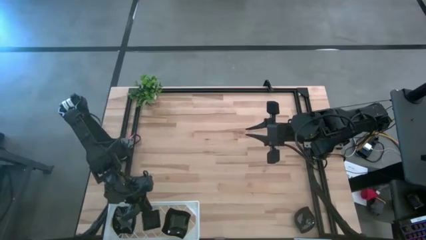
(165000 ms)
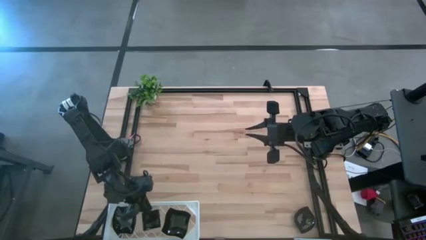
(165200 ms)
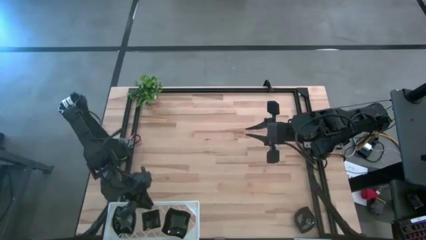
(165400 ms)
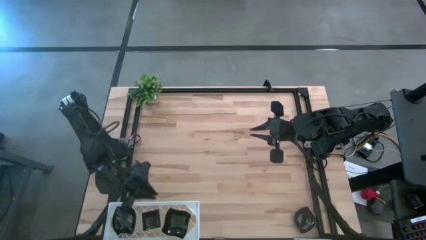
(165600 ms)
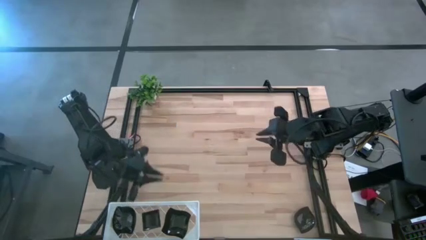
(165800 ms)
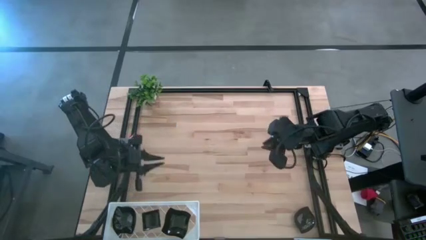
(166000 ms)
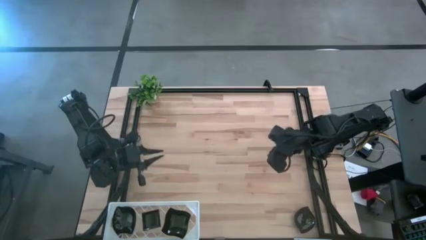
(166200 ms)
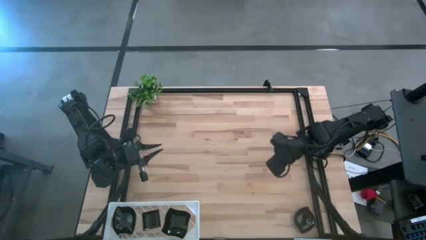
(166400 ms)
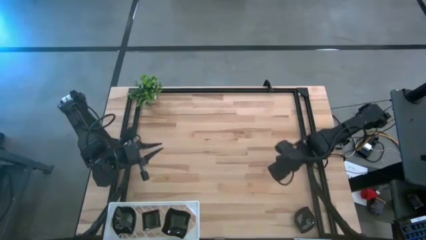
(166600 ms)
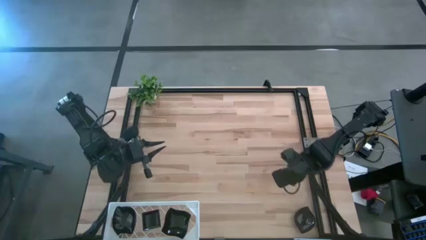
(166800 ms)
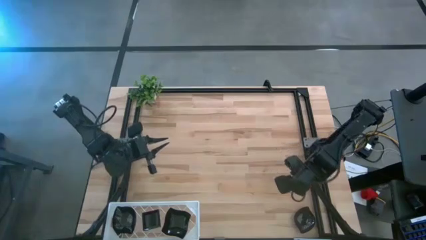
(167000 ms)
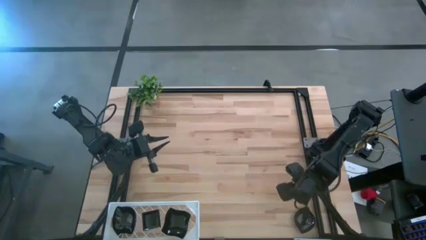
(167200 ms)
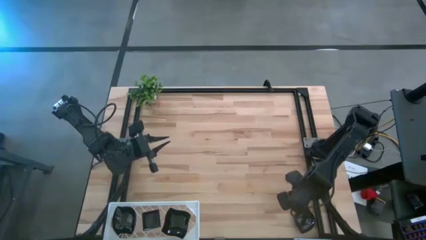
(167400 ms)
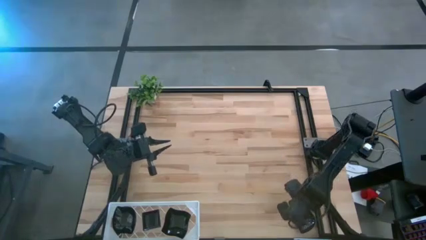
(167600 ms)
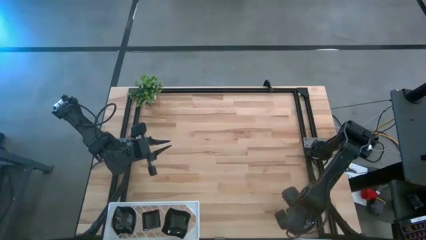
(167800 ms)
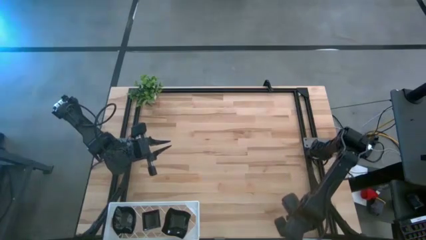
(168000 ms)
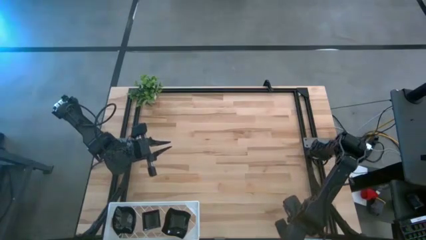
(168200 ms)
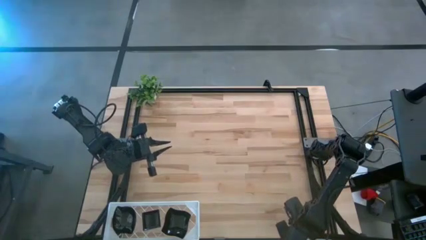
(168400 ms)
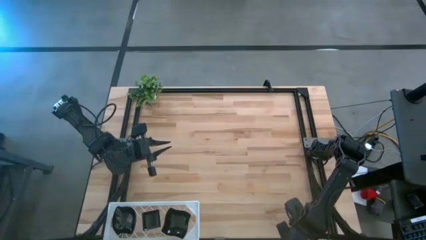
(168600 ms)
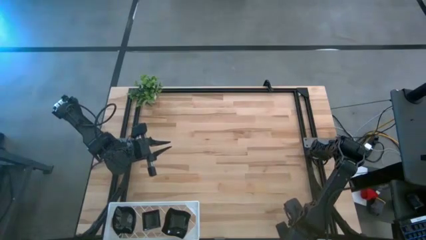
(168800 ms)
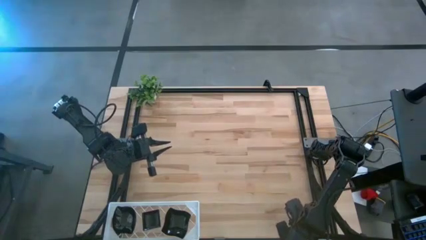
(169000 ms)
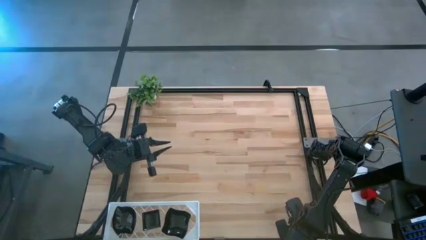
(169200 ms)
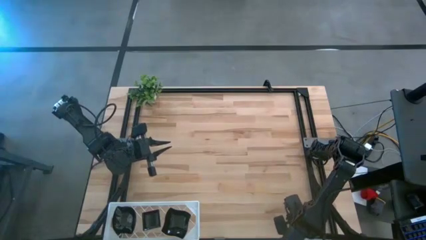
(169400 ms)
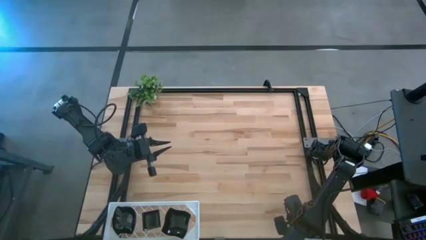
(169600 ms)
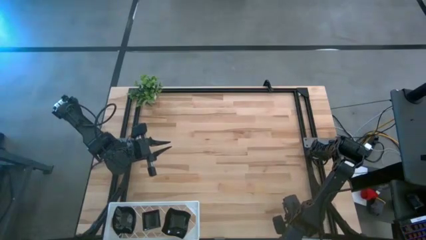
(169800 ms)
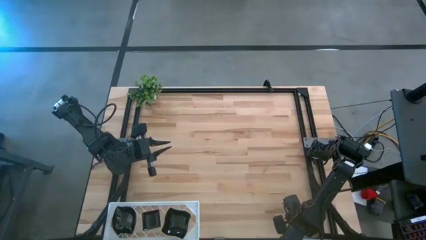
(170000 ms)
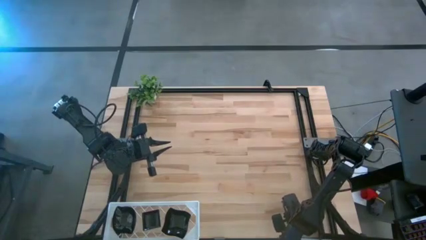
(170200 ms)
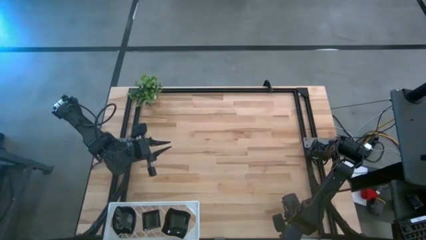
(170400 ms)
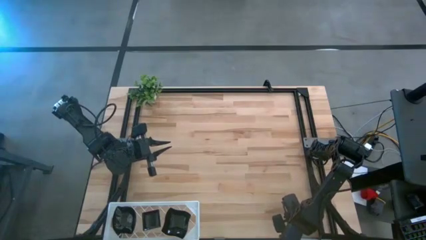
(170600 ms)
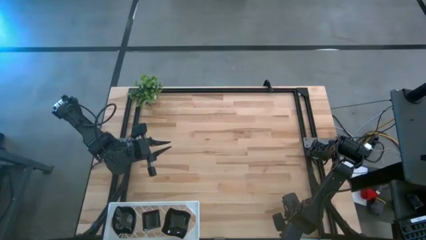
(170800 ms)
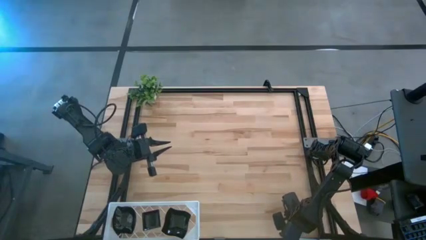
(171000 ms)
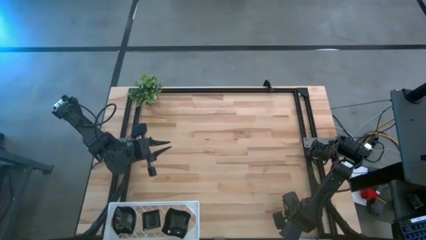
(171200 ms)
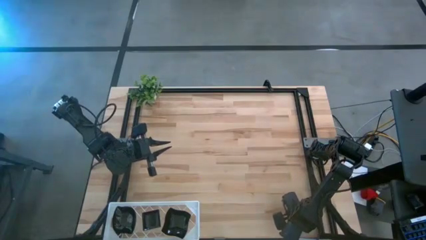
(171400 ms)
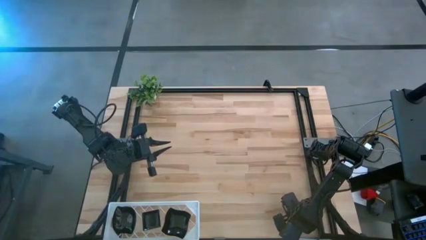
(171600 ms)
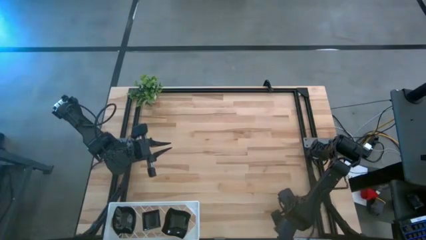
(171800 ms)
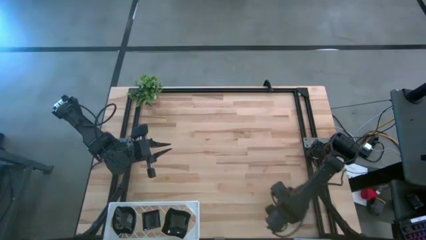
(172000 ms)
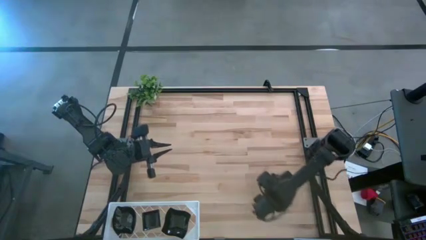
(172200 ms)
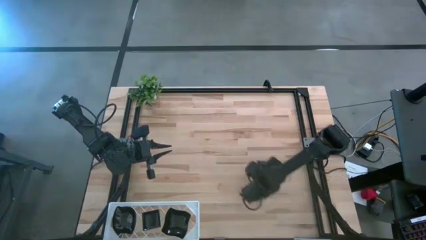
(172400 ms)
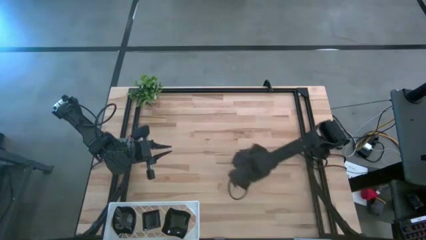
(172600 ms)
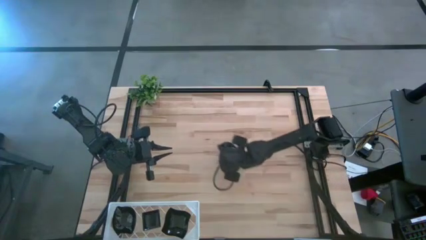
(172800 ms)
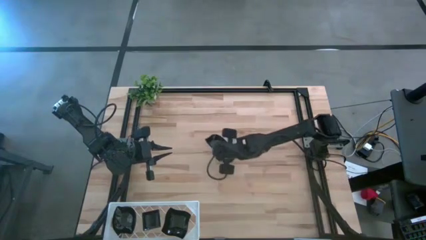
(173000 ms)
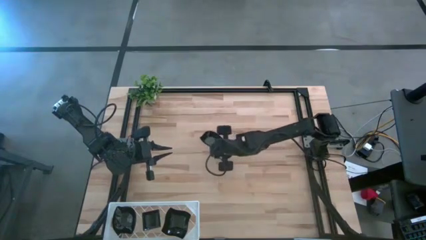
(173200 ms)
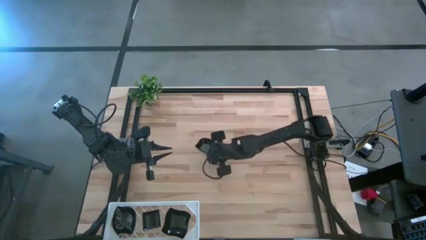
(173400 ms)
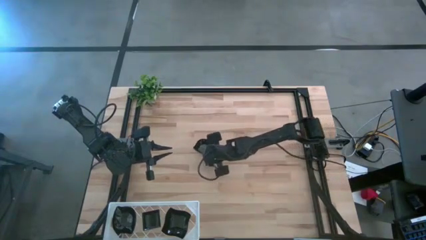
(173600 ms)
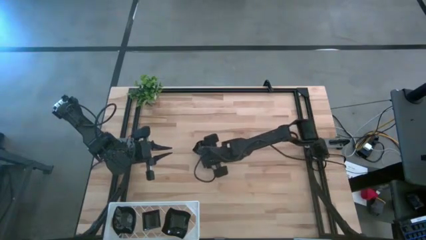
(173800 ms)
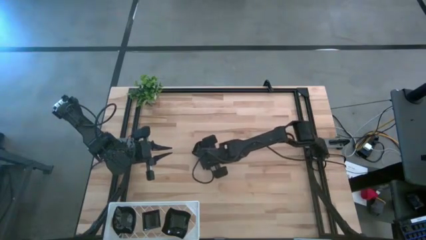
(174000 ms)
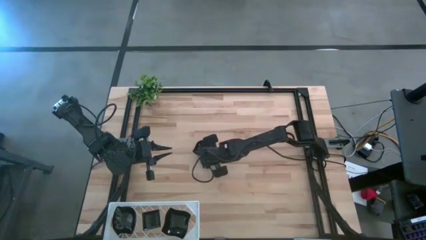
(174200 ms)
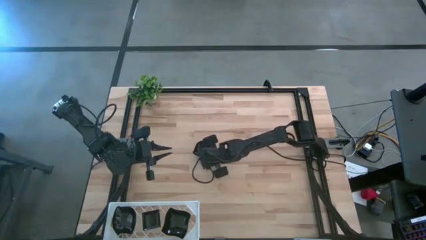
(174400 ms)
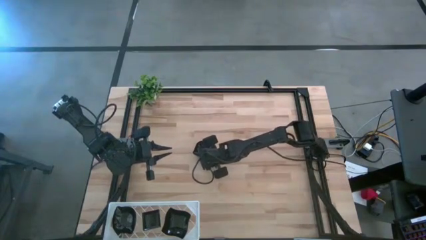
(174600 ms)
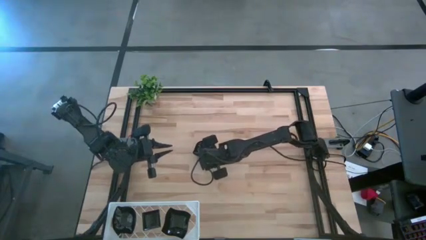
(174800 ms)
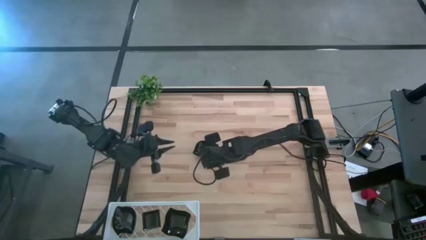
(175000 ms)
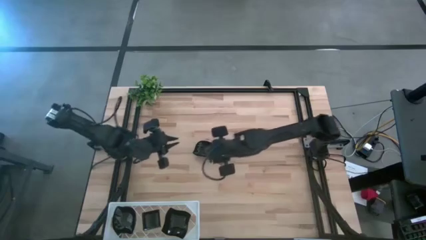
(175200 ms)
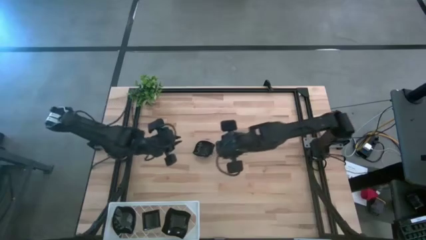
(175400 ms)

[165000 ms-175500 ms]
Task: Pick & Place Mini shaped plates
Stack the black leaf shaped plate on top of the other black leaf shaped plates on the shelf

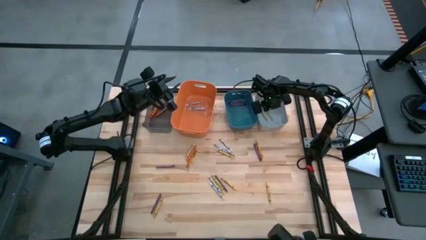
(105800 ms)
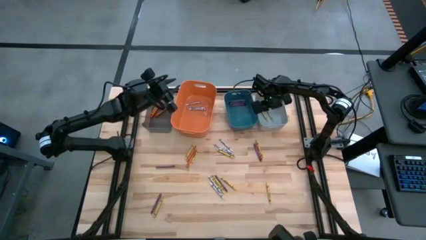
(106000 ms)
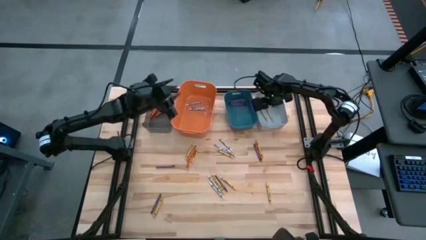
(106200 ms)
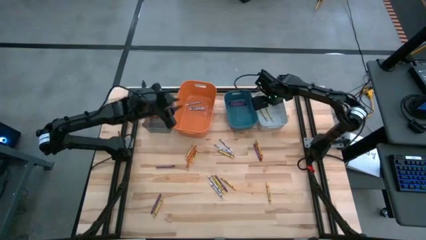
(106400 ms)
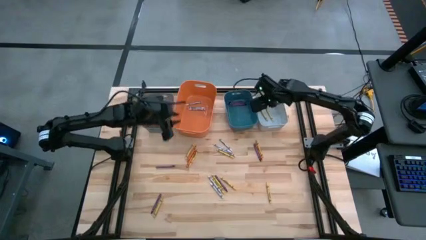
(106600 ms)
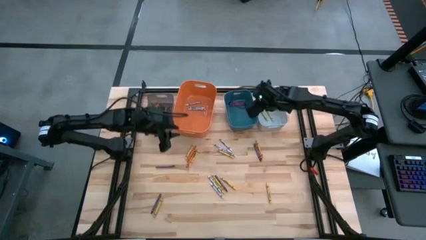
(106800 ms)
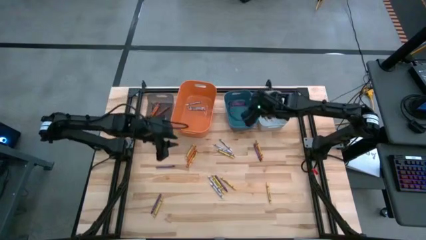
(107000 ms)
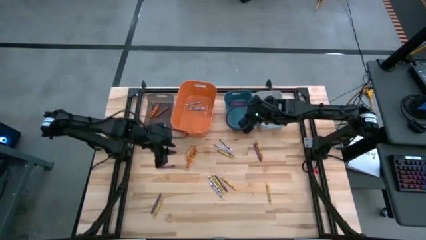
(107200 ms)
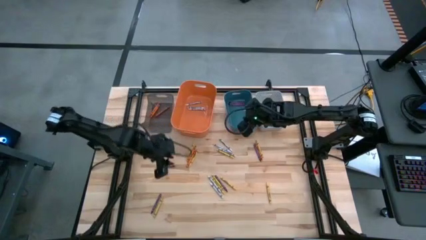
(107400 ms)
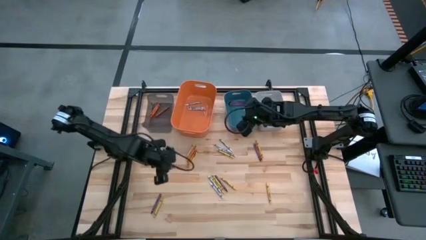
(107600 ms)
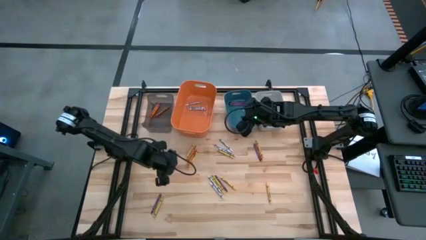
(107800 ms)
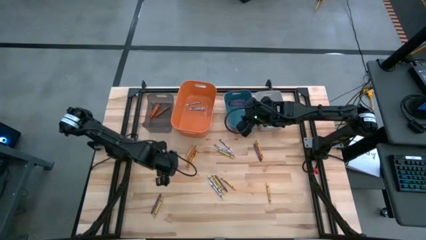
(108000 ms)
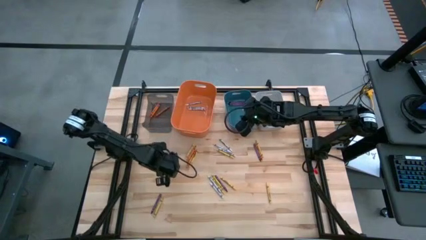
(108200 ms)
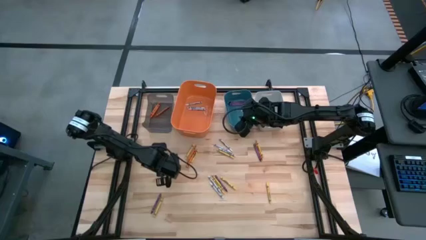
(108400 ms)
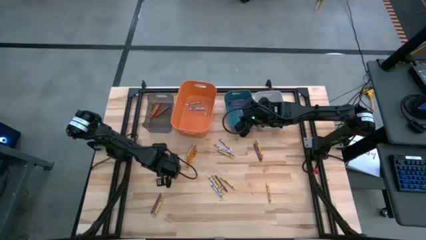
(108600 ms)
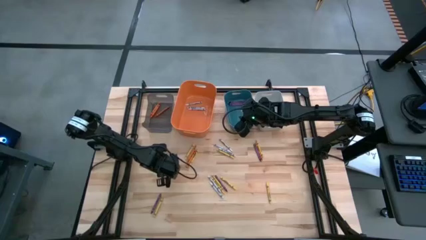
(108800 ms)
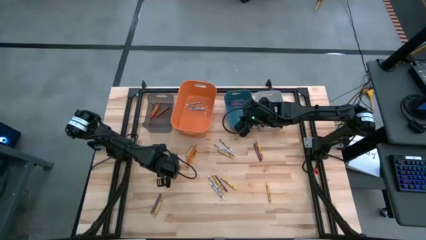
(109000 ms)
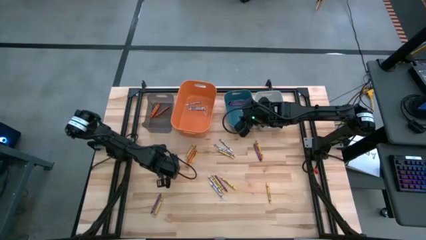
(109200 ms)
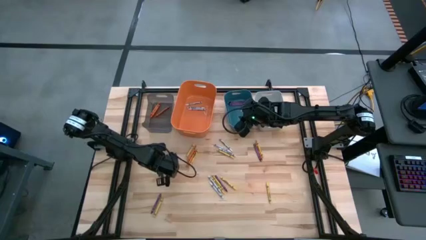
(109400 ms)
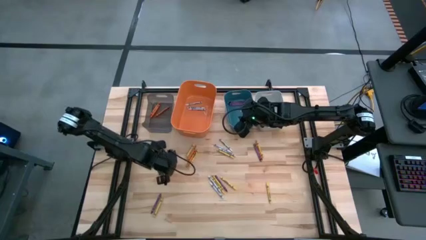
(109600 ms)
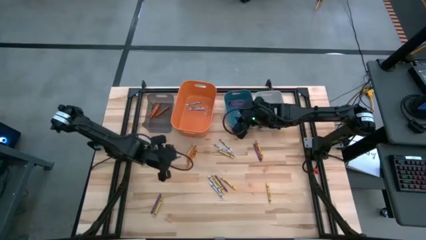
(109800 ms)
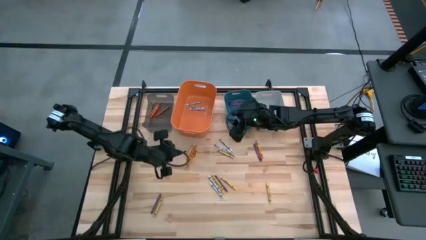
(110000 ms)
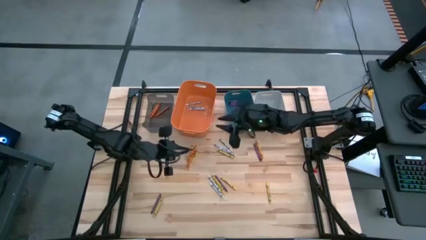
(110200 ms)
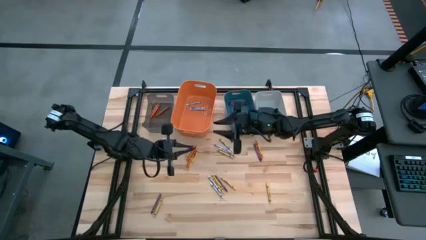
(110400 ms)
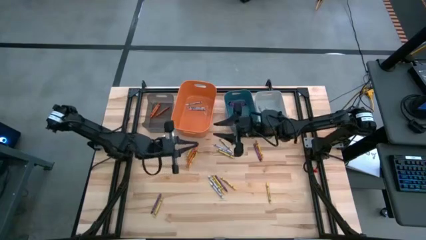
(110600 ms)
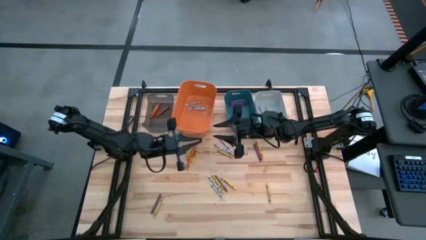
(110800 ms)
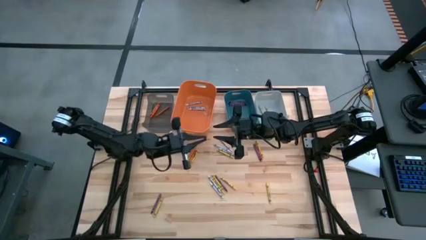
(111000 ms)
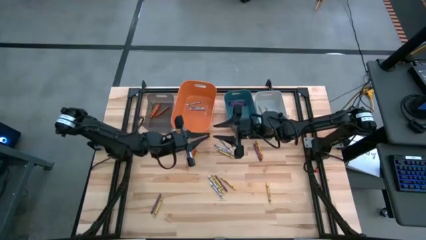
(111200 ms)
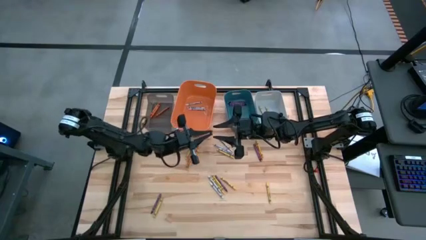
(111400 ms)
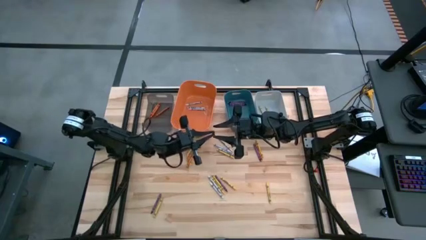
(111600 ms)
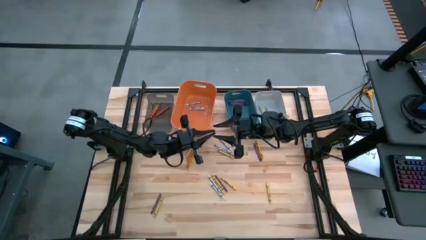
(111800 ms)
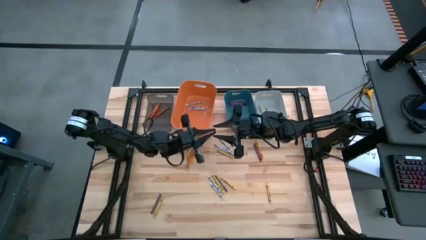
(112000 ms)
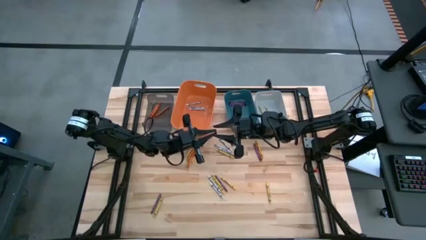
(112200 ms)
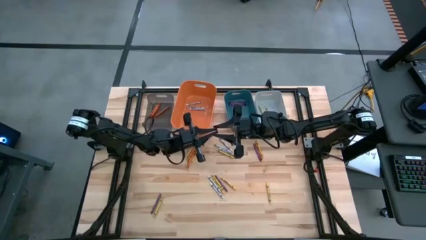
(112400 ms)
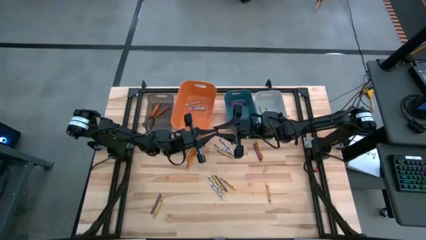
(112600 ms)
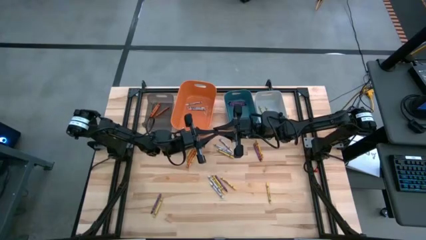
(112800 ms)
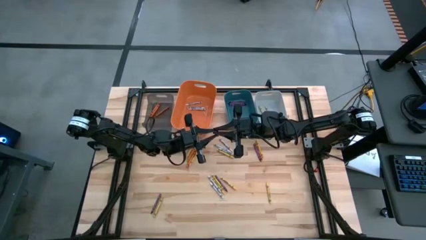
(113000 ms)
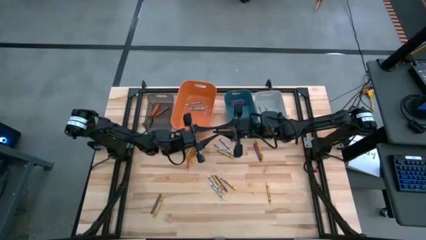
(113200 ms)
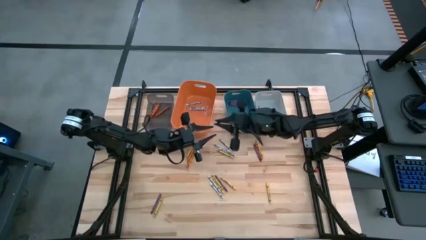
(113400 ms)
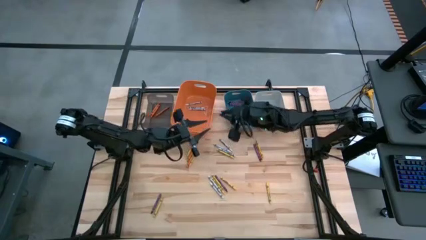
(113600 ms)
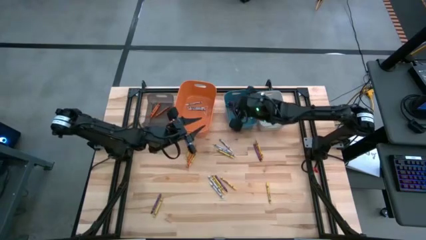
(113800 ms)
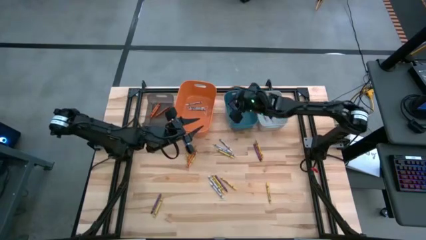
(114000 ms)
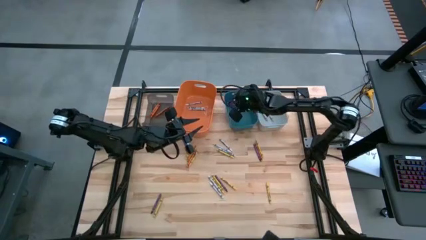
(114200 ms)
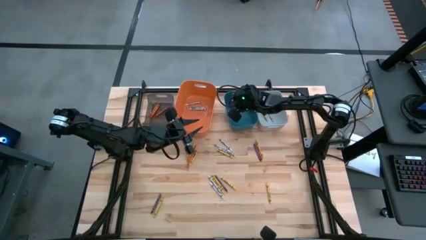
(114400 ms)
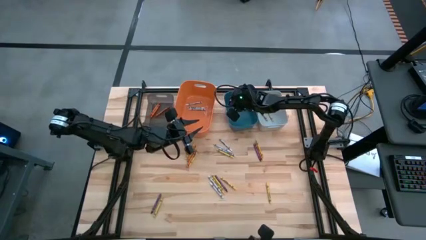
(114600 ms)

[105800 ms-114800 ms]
Task: Sort crayons
Put the purple crayon into the blue bin
